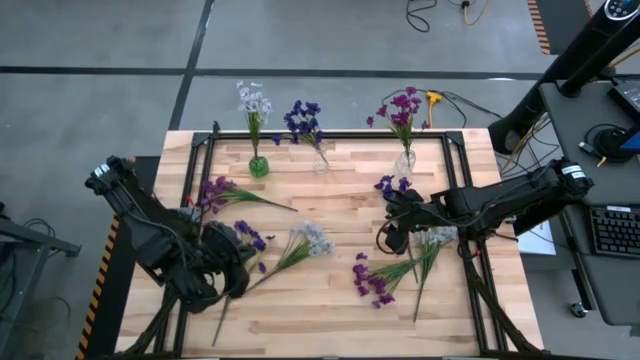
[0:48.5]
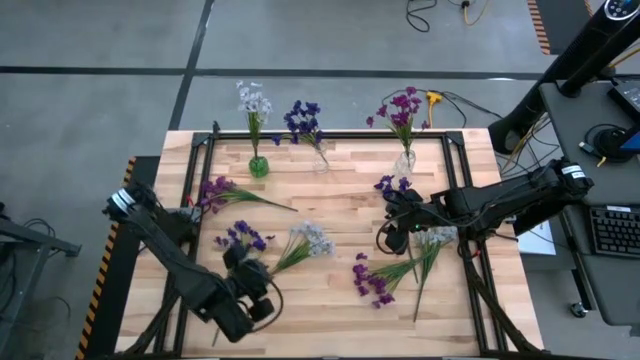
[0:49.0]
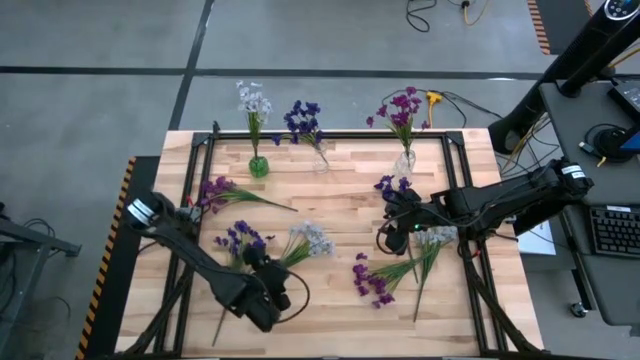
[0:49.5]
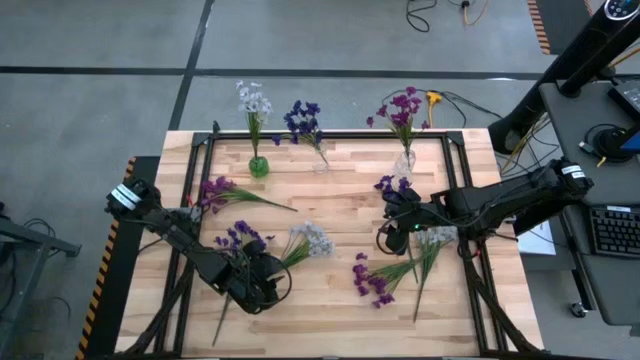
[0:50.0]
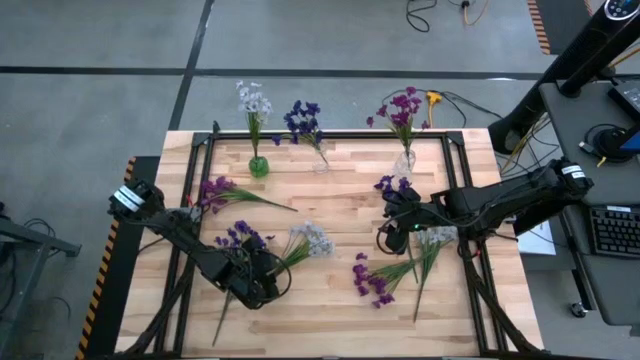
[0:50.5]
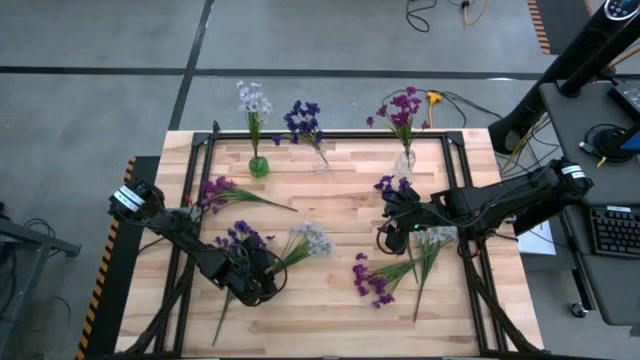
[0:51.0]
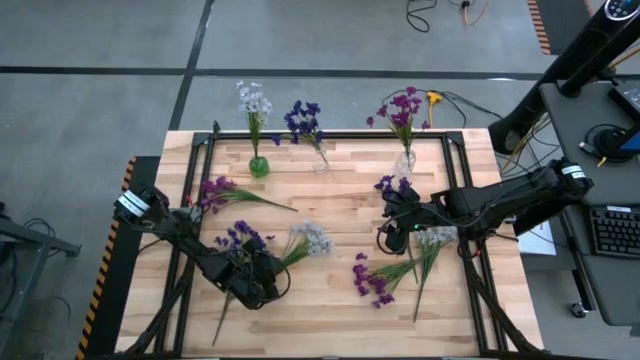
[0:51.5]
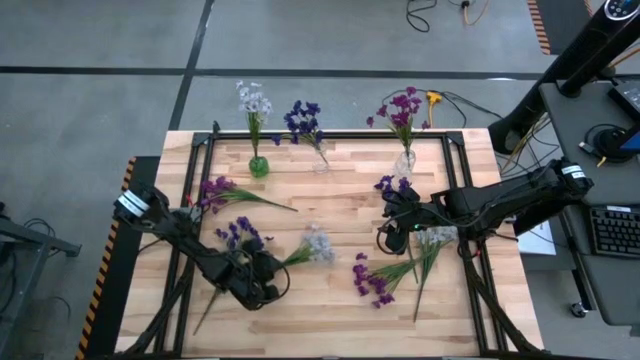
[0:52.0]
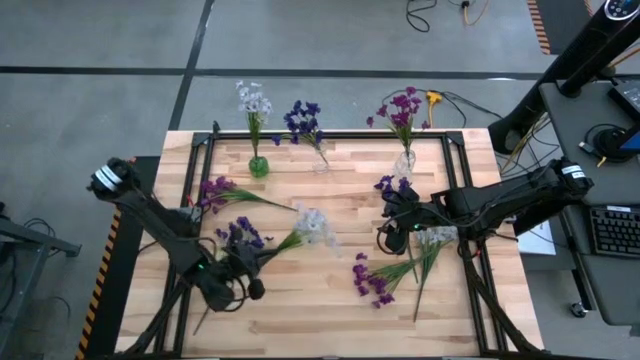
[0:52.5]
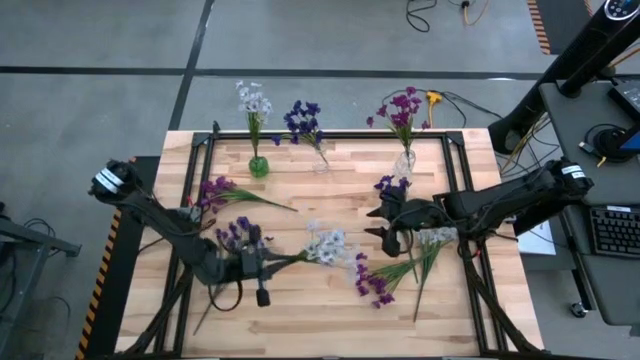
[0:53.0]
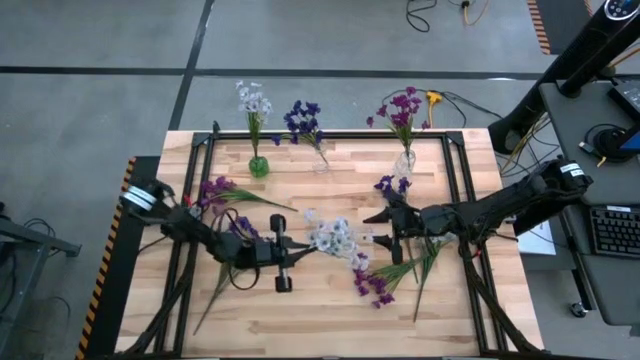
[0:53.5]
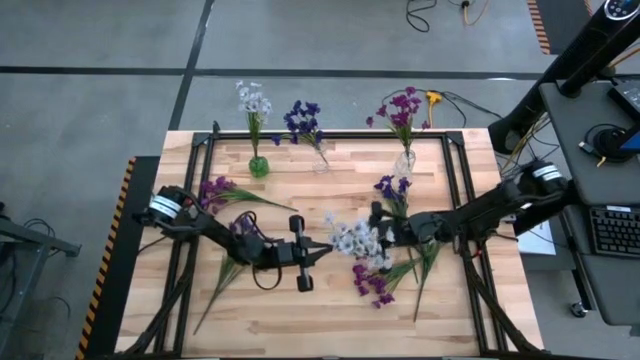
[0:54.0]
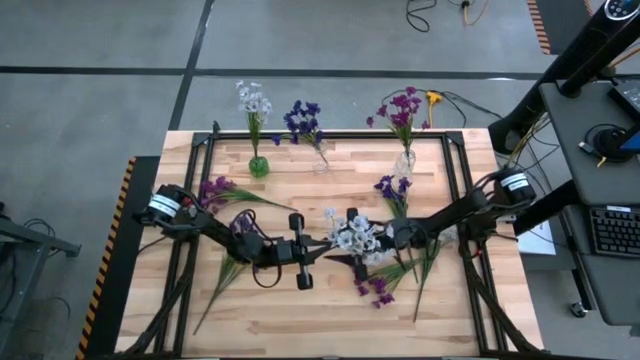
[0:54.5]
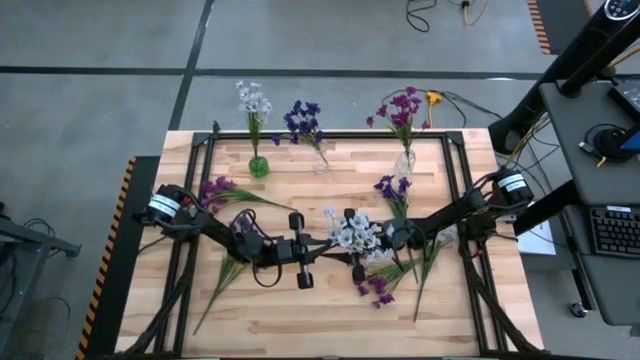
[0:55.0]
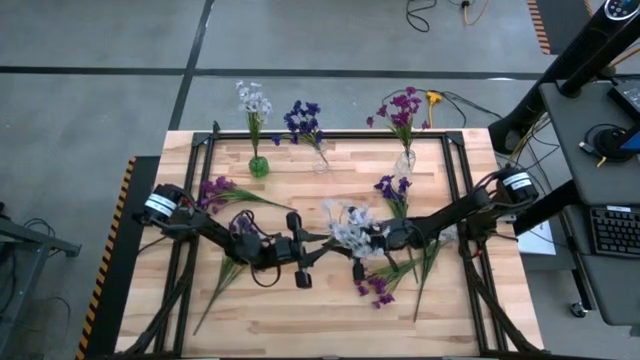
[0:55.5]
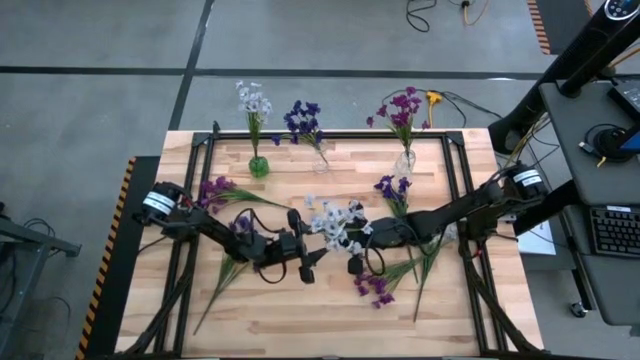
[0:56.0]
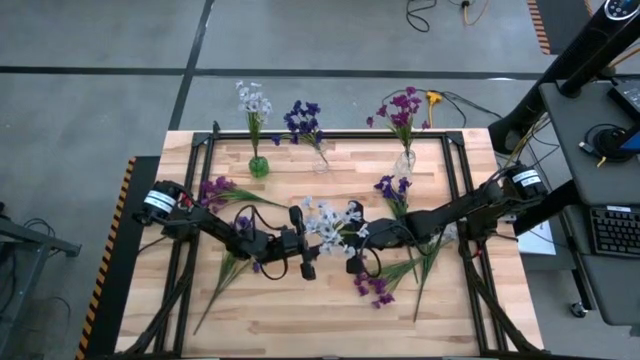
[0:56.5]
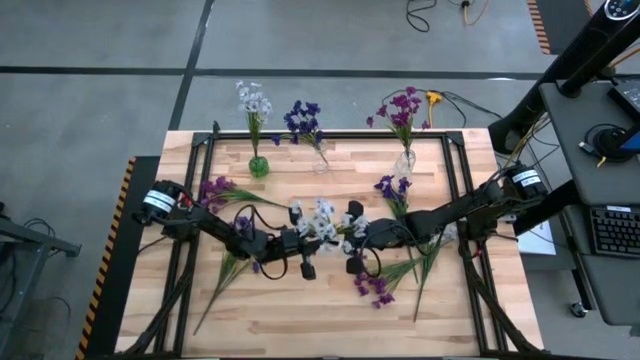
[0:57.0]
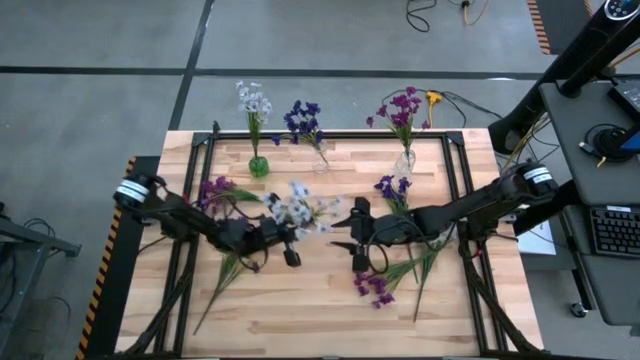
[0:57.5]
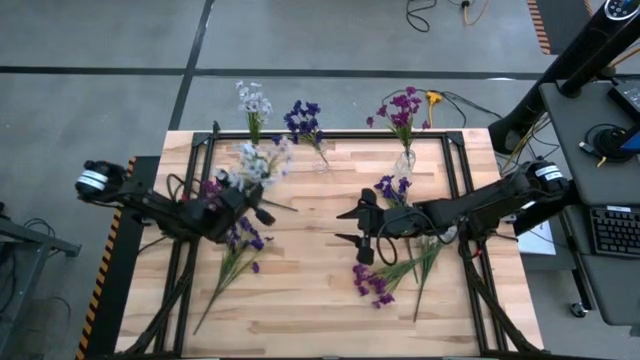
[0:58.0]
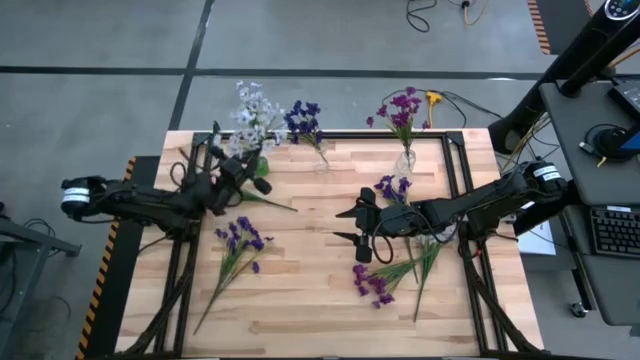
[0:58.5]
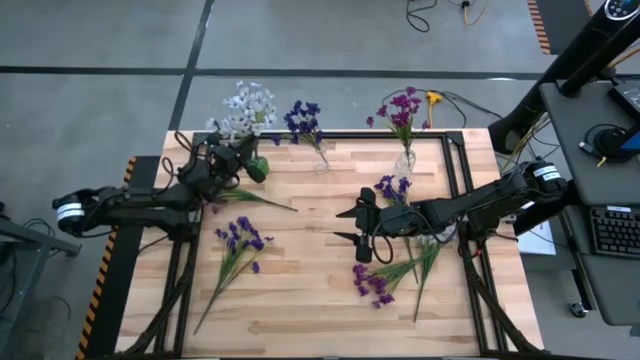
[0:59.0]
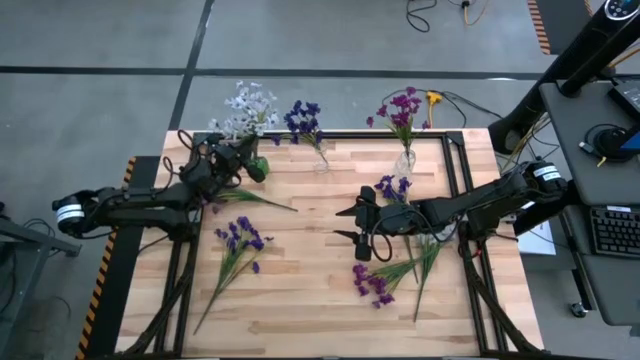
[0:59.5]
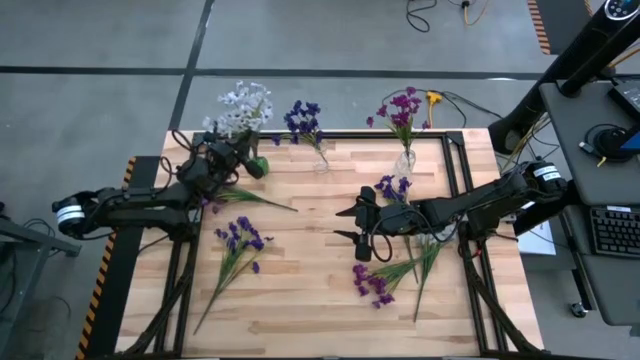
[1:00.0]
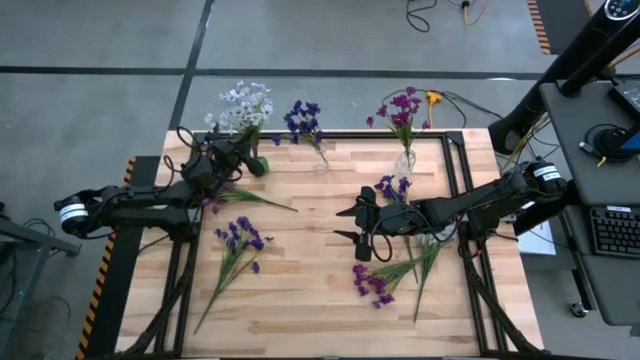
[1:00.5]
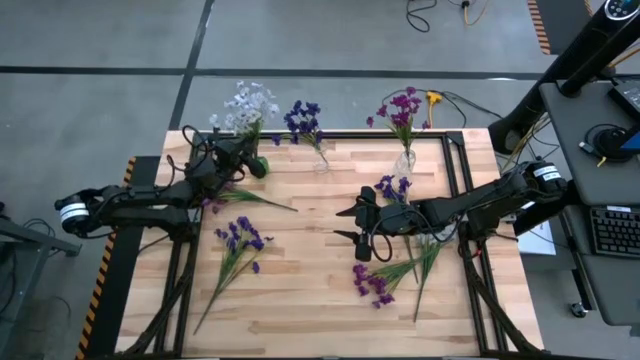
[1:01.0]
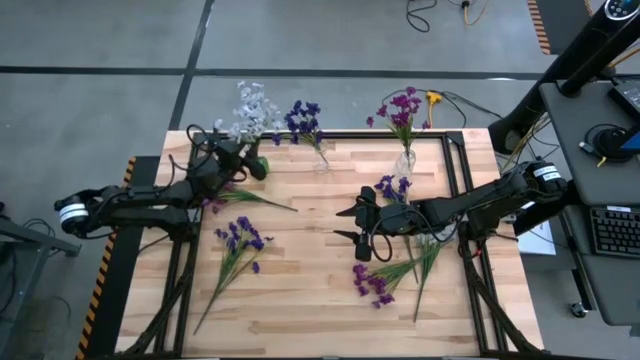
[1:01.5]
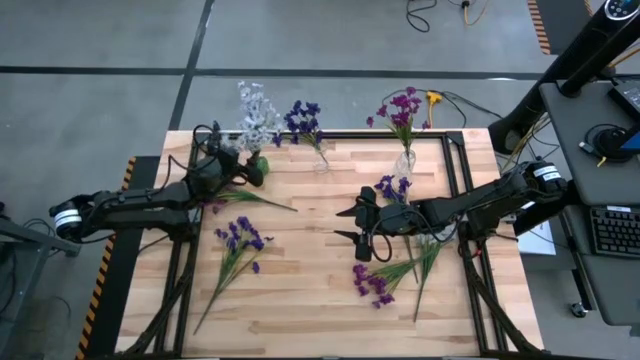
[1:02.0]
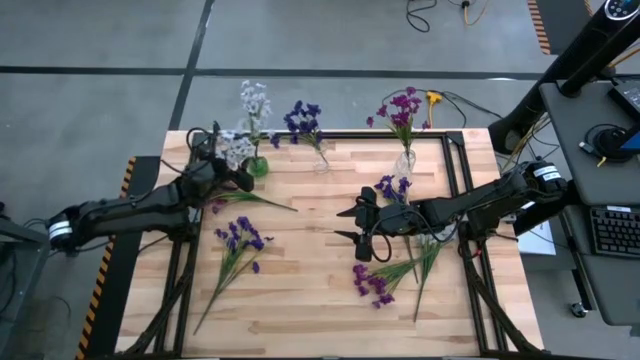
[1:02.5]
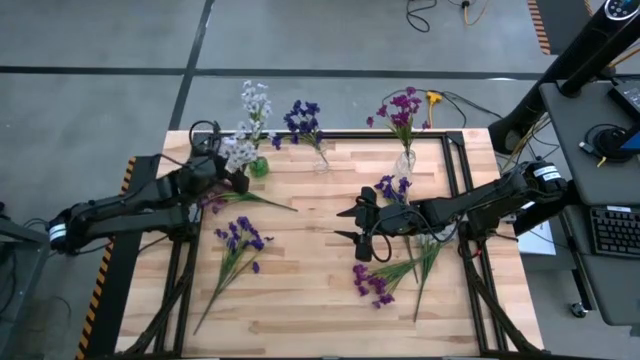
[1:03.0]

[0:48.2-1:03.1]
Task: Sort flowers into vase by color
Put the left white flowers into the green vase

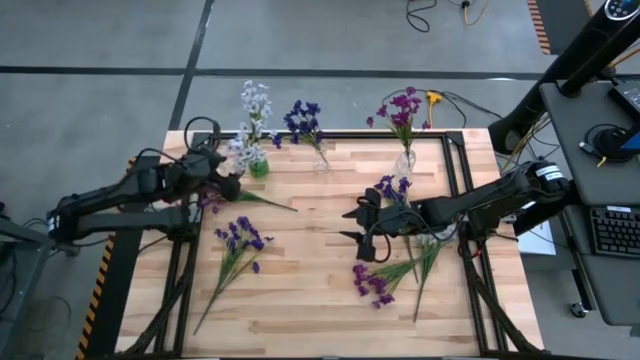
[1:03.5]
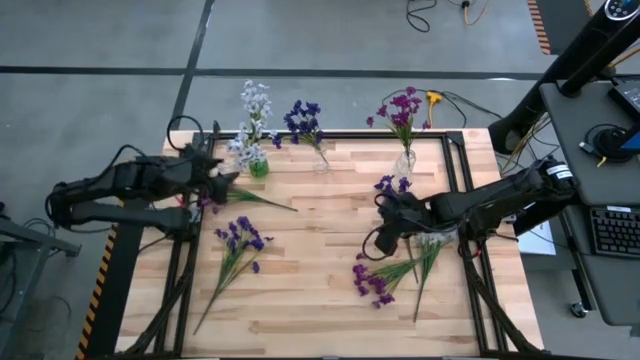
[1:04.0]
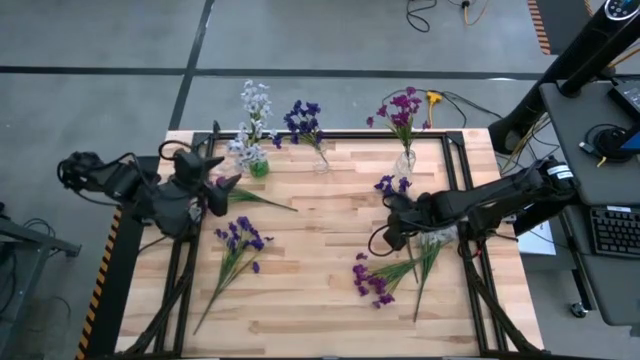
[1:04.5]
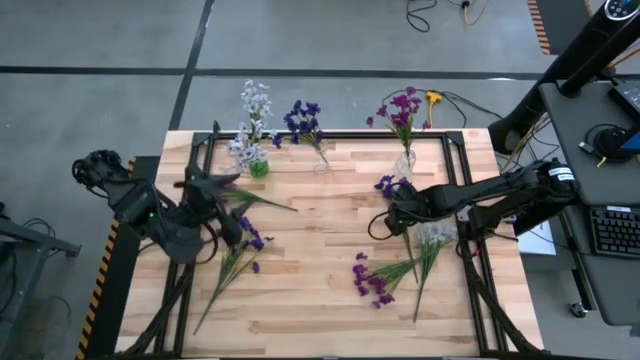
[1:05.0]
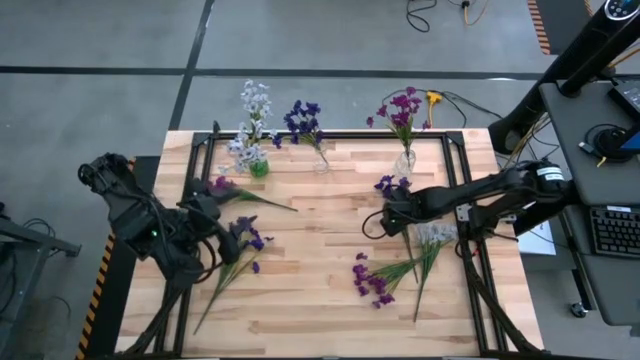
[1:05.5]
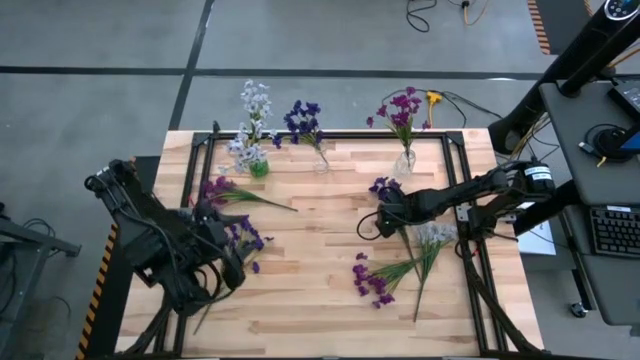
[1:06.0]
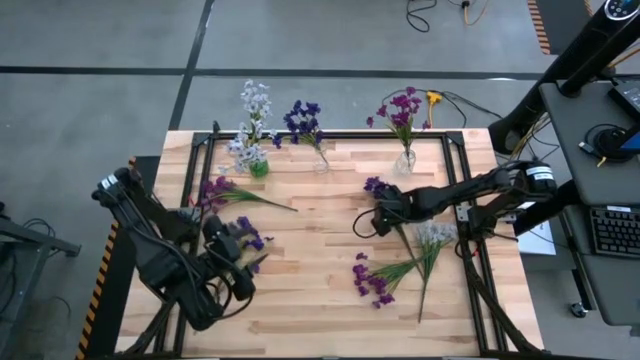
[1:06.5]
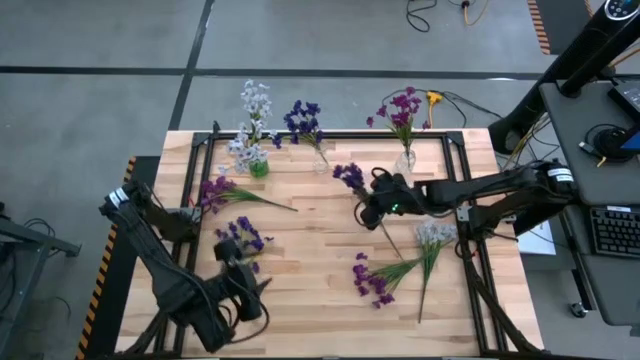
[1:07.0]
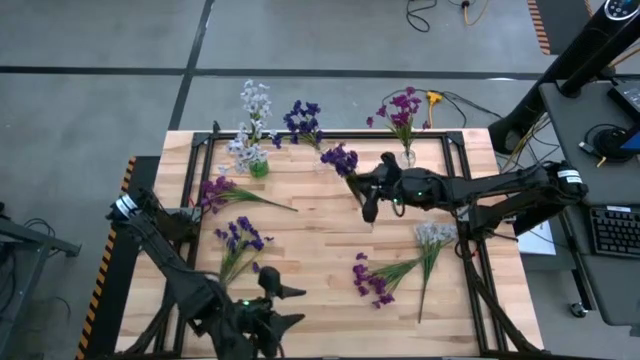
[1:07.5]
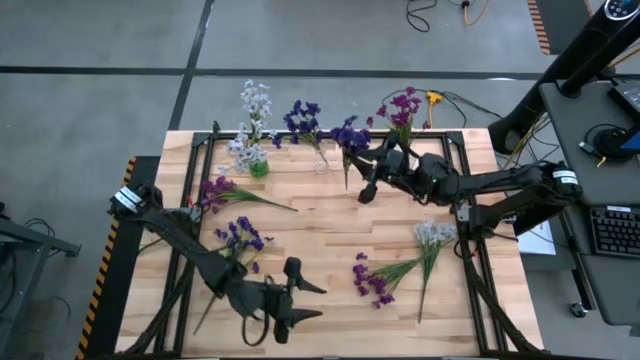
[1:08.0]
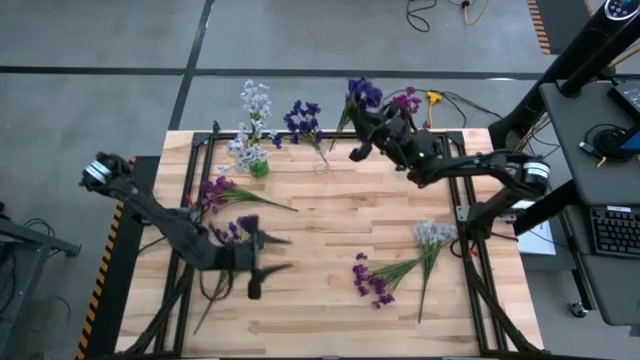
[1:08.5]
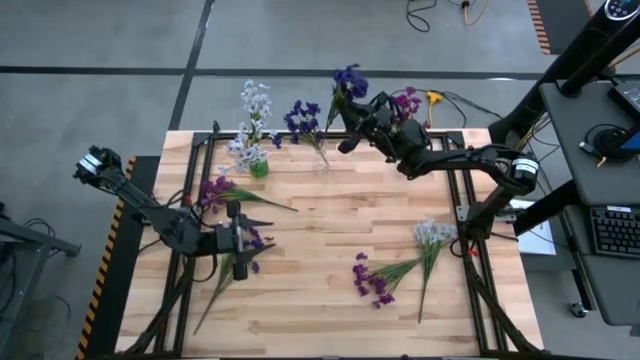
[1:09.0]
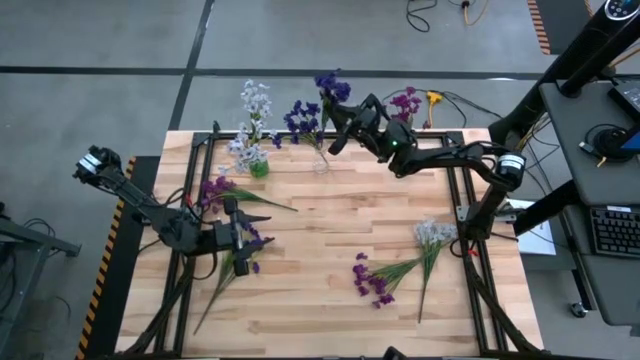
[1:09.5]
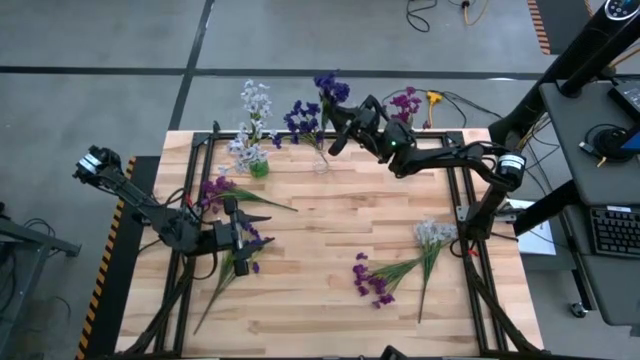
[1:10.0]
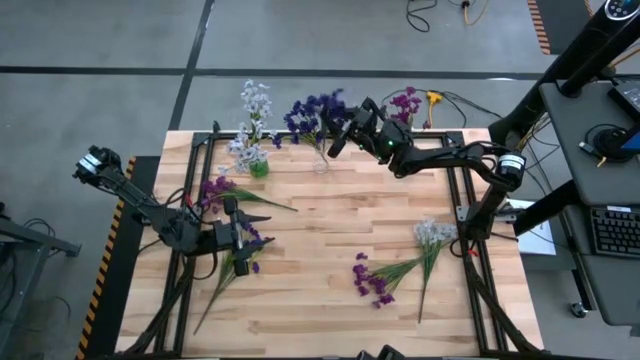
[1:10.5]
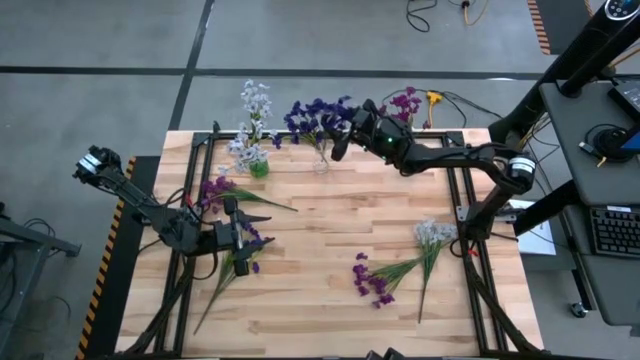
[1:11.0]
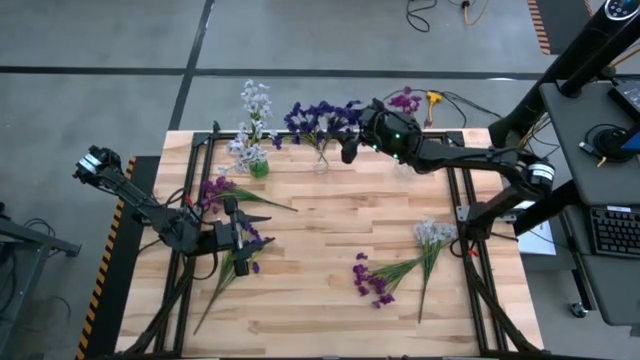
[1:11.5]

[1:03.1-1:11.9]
Put the right dark violet flowers into the left transparent vase
